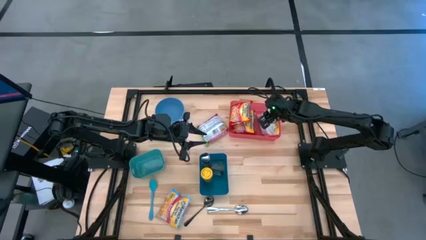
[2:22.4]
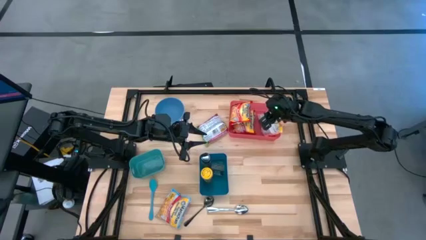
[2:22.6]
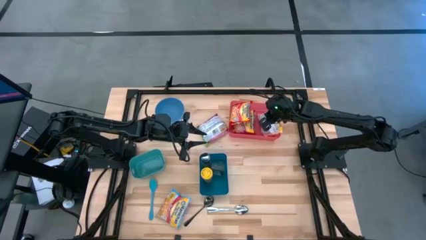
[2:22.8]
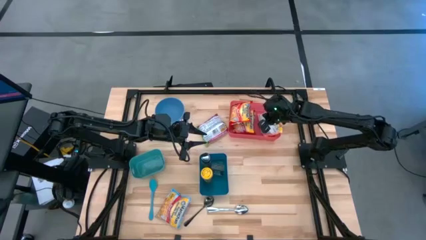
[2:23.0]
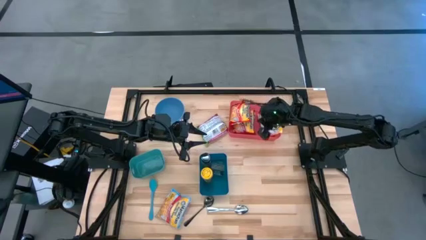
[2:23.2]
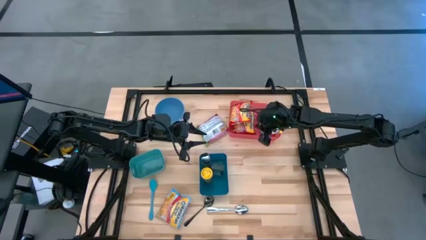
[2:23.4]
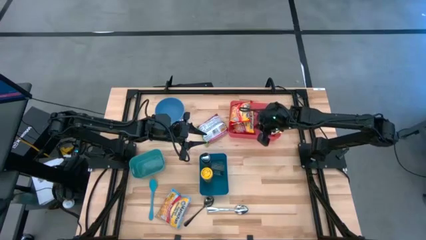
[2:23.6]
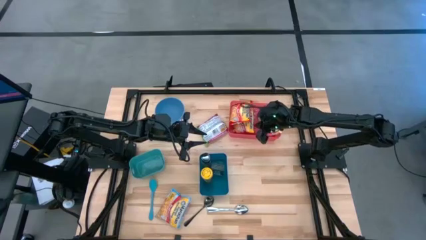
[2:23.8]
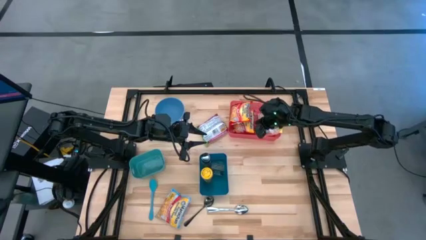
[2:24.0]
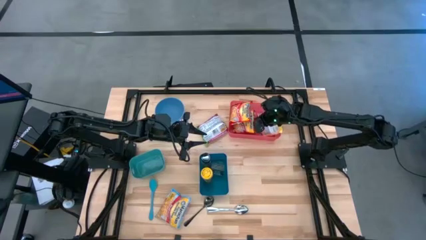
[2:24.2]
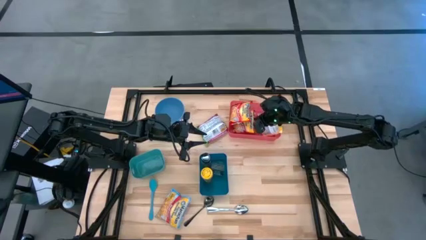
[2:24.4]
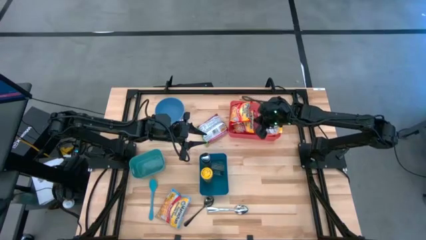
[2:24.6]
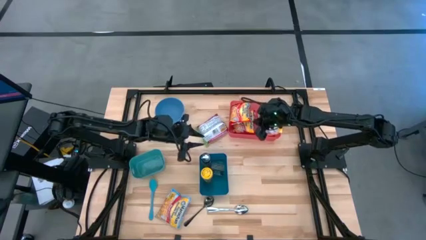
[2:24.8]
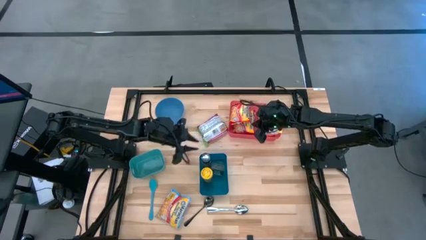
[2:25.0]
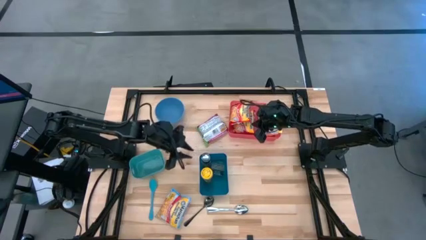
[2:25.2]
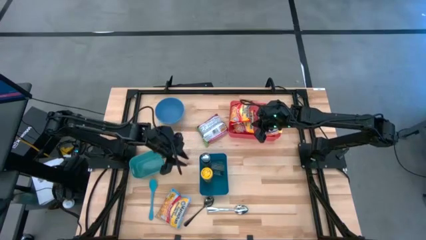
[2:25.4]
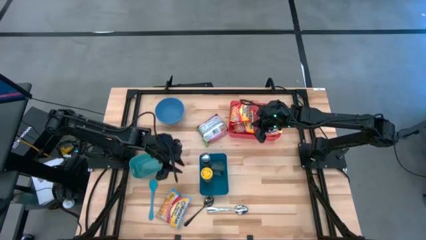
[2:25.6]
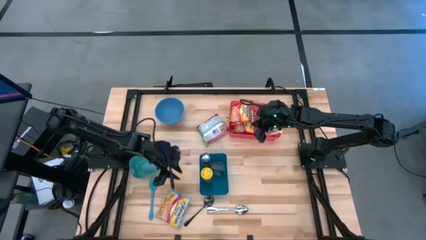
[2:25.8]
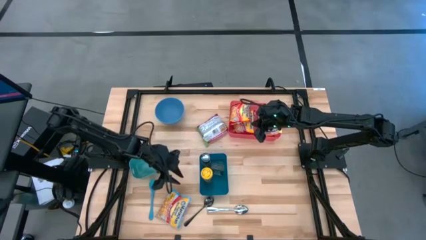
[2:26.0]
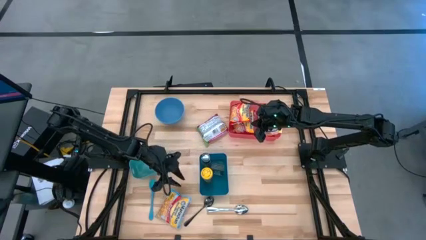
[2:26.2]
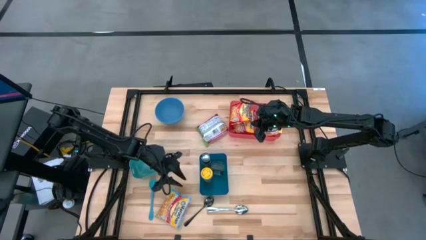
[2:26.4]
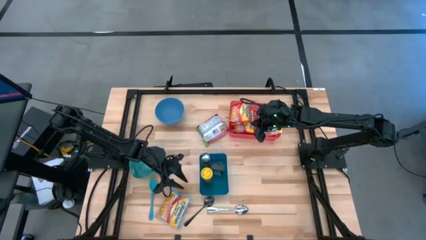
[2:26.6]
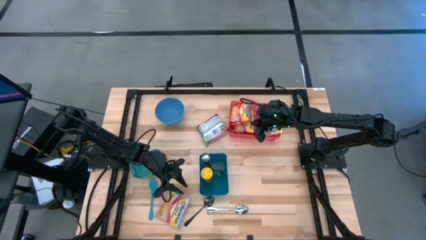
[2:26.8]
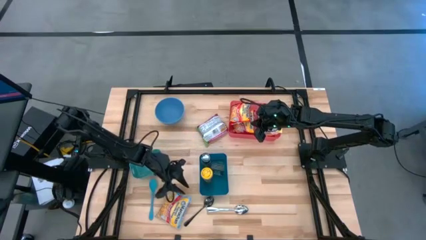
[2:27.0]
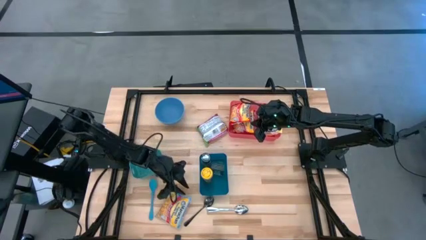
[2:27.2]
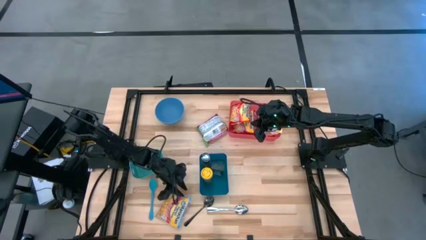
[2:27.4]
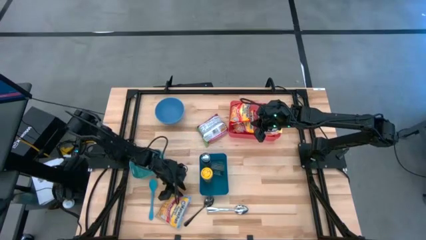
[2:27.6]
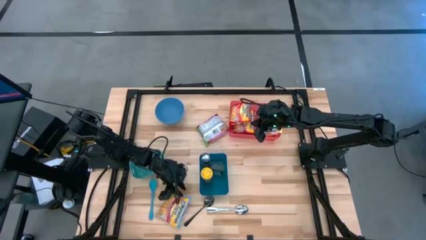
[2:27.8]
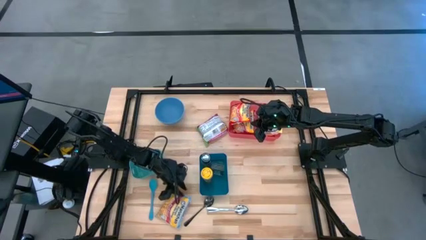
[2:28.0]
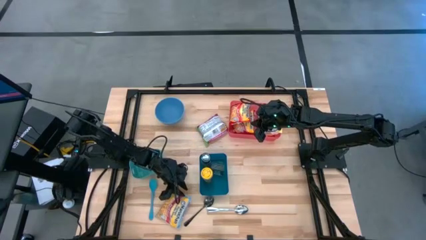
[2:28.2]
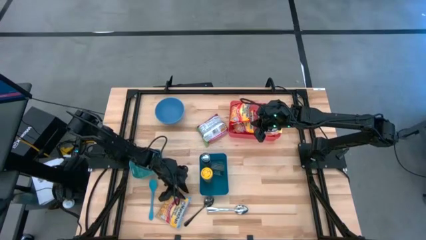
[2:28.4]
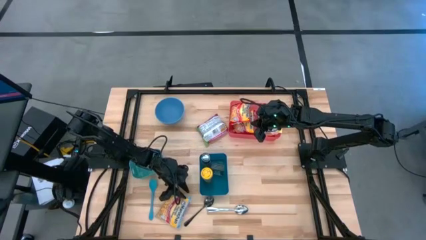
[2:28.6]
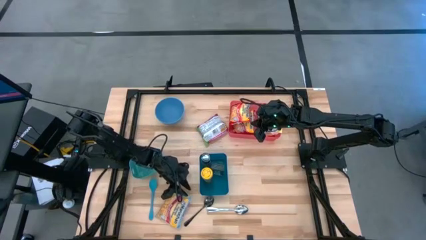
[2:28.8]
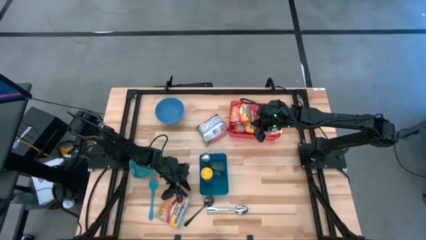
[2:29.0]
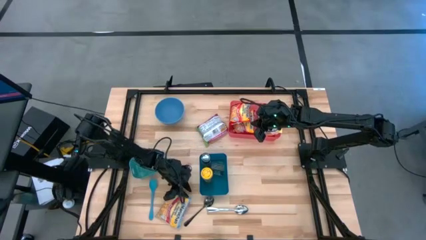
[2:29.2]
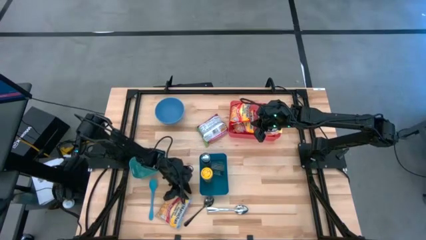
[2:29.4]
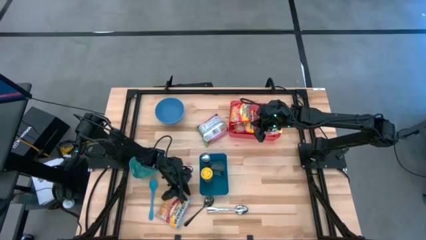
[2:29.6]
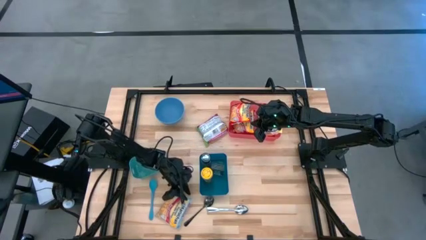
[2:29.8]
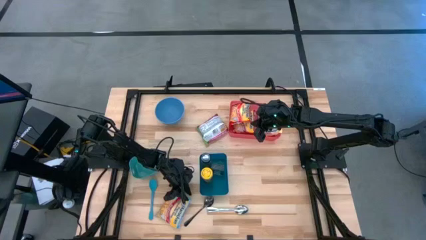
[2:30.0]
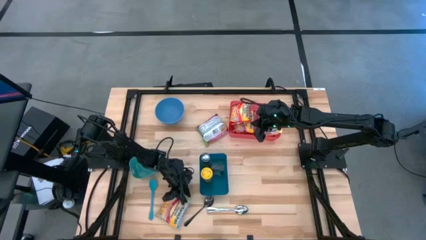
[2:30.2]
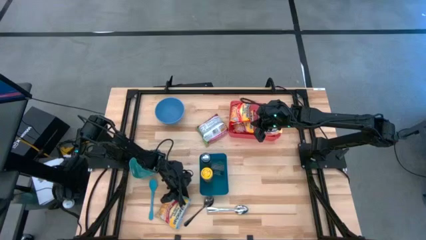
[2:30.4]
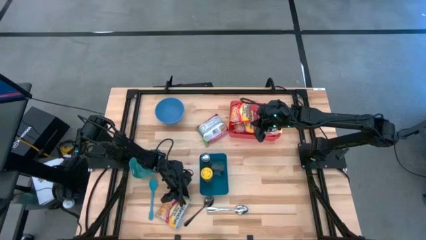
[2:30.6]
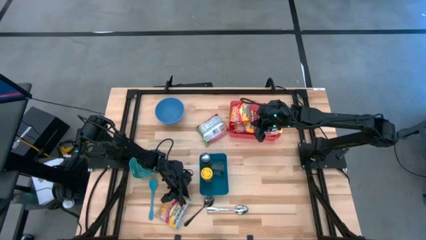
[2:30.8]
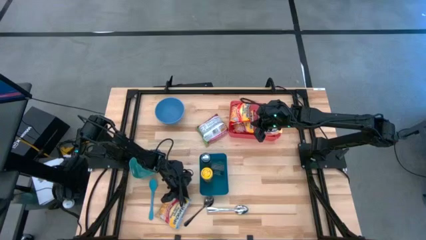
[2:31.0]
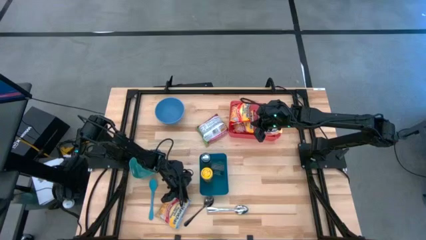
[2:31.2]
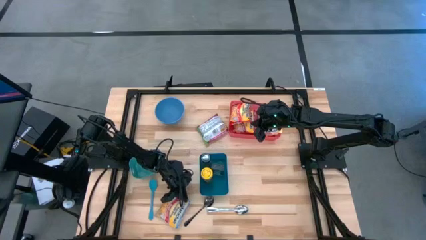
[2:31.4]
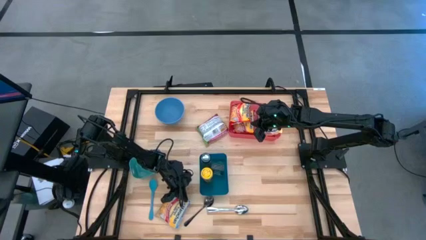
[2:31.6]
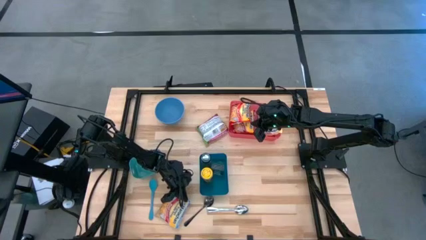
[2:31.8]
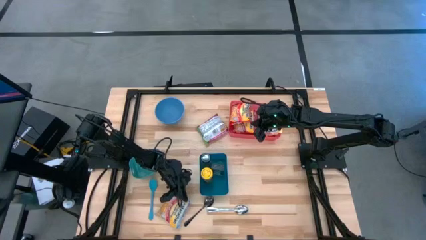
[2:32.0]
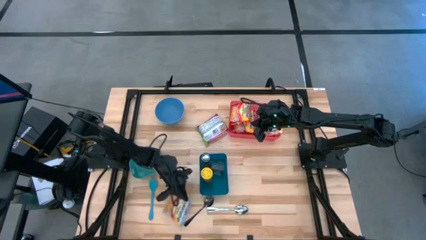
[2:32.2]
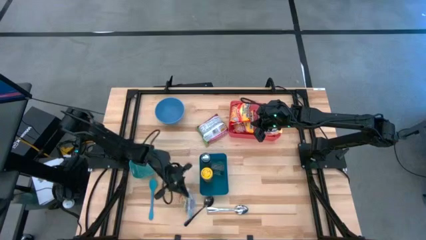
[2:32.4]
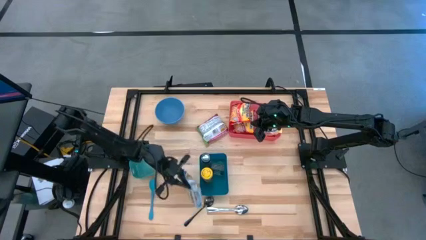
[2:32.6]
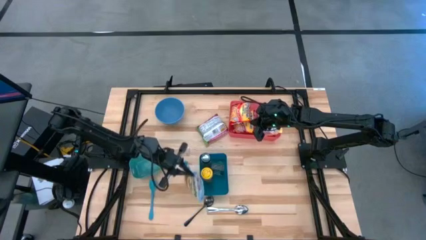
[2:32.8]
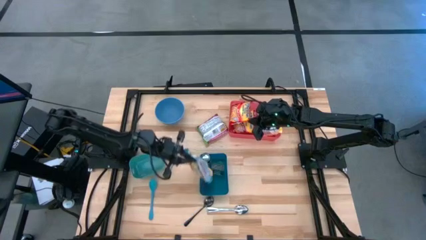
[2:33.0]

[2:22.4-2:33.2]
Task: Pick & Place Food Item
Put the light blue noodle pack into the red bin

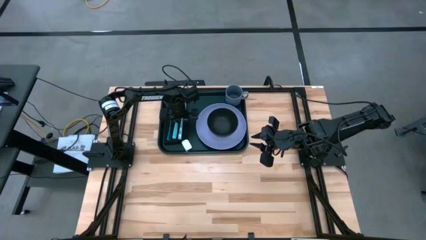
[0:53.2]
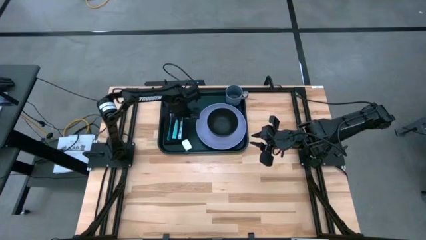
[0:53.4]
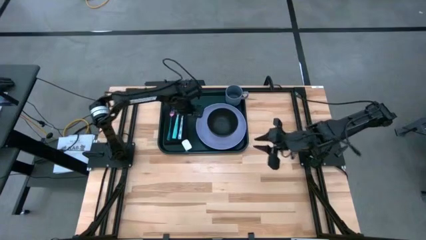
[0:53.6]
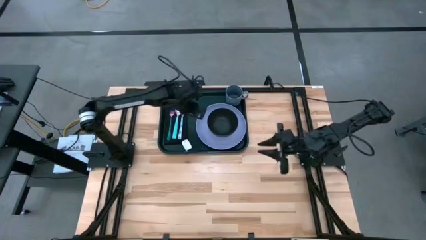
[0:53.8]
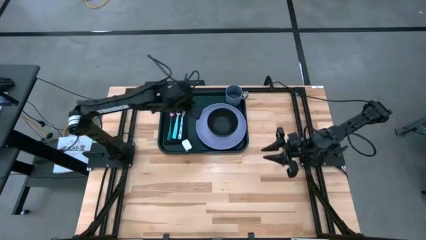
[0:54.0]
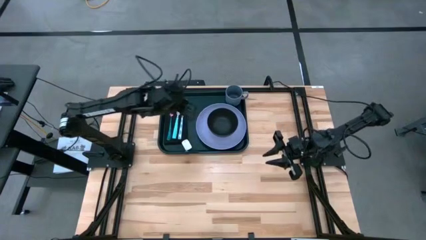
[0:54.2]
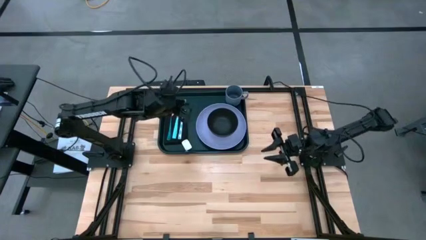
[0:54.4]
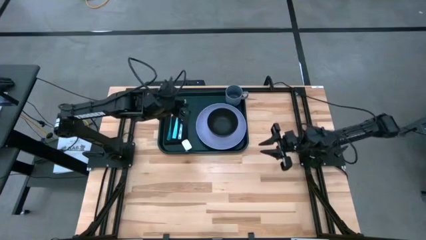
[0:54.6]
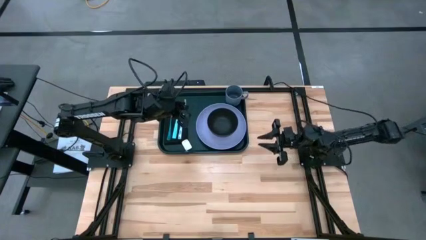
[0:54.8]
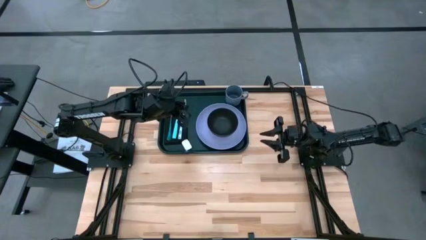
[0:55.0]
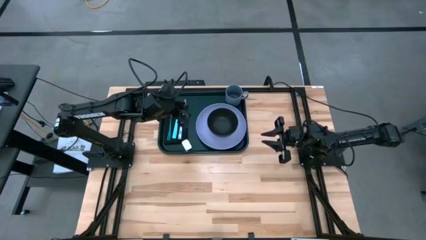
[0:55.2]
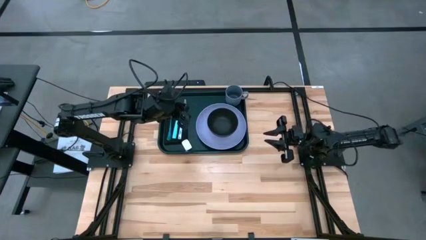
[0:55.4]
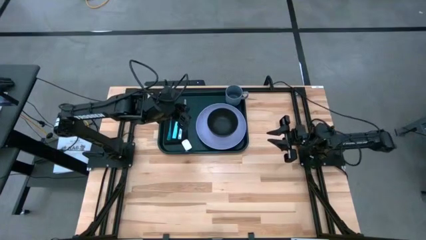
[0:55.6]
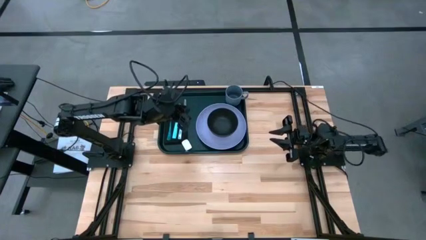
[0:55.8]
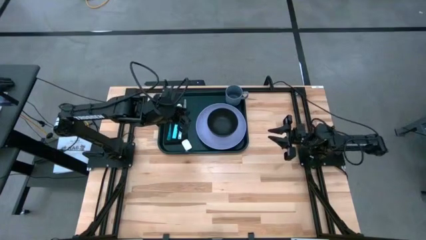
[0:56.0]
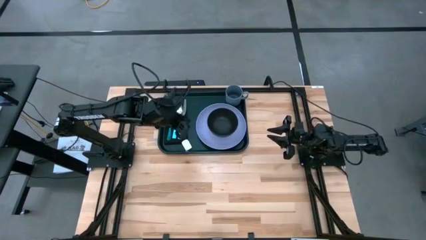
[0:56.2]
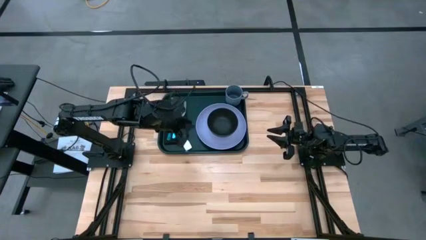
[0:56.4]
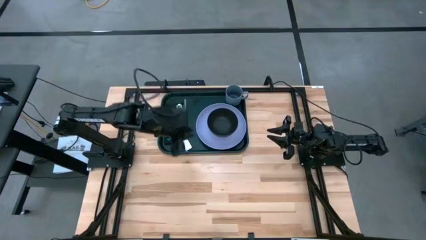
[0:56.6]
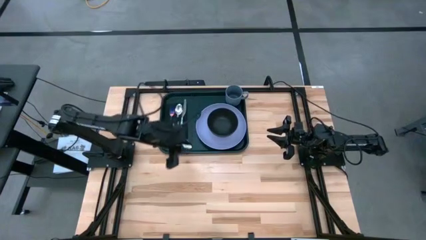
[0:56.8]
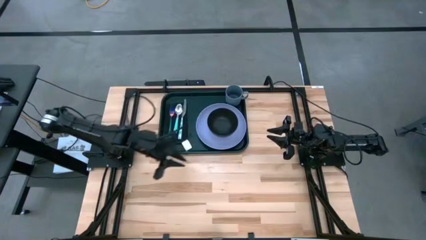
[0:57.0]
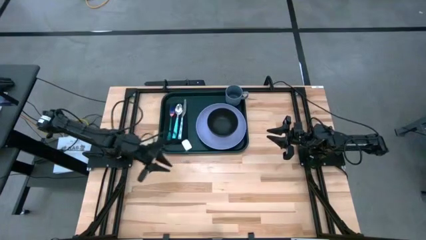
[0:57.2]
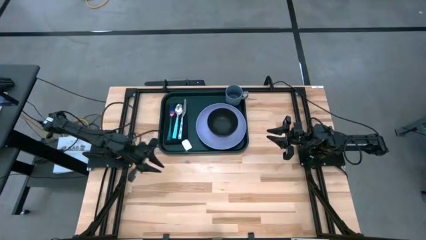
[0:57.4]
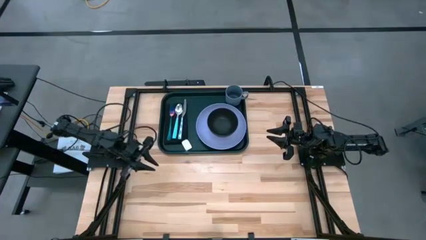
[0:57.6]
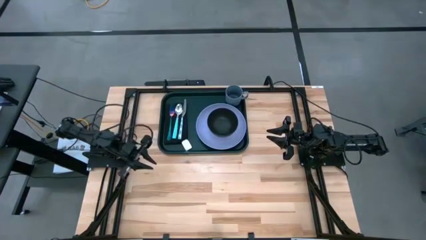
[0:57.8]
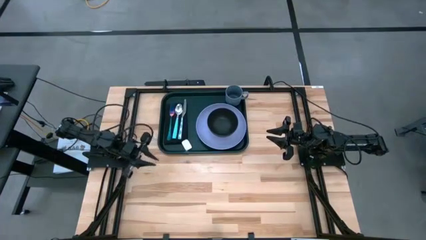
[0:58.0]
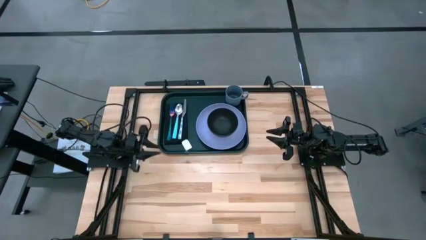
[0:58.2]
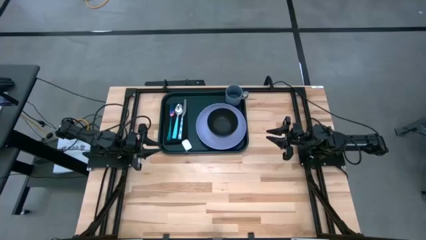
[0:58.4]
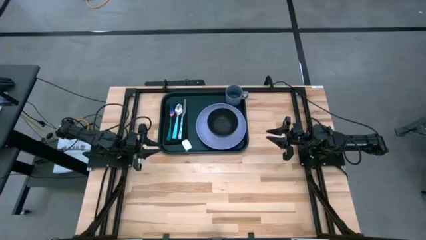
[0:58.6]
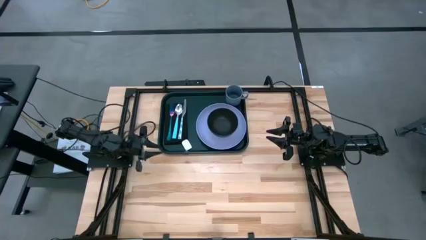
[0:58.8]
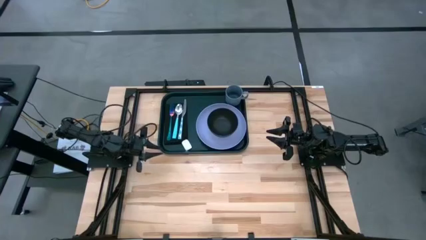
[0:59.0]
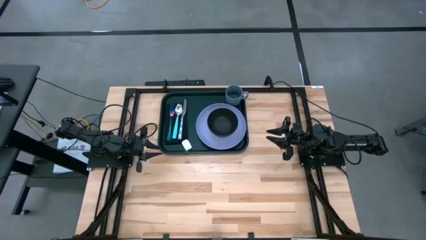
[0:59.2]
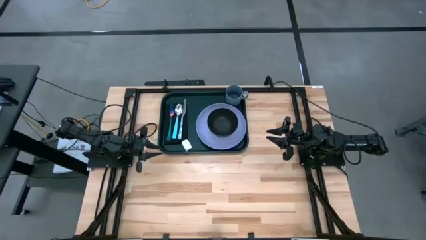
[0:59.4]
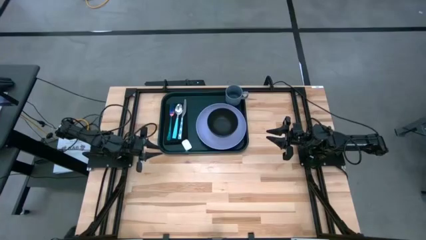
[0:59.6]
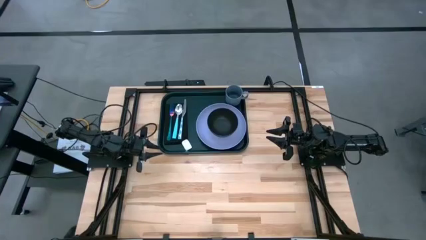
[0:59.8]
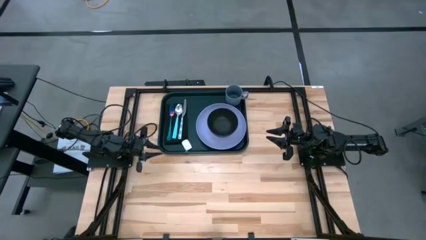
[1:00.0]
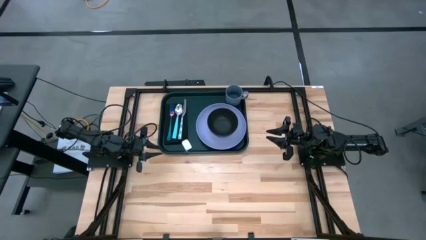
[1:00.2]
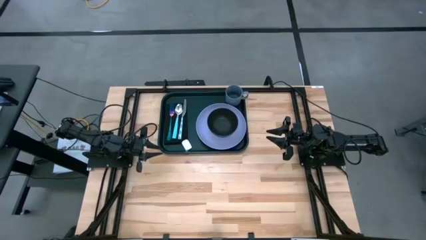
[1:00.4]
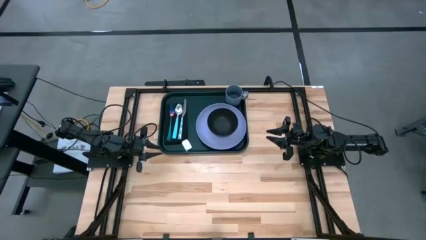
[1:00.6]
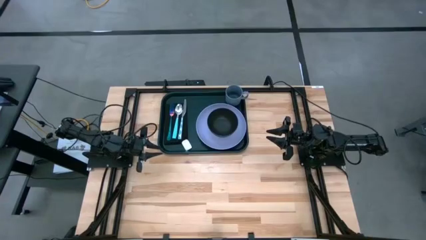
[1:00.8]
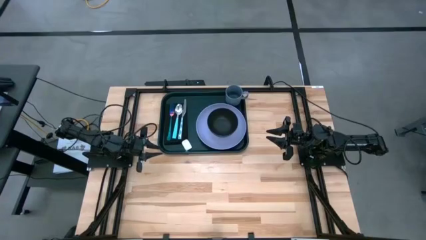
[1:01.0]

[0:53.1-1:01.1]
Task: Set up tray
Return to Home Position
